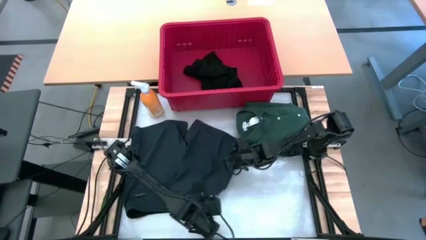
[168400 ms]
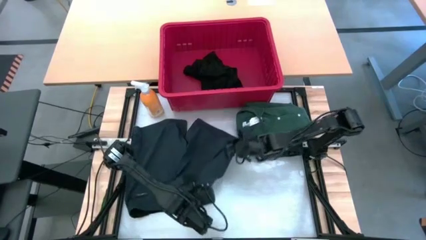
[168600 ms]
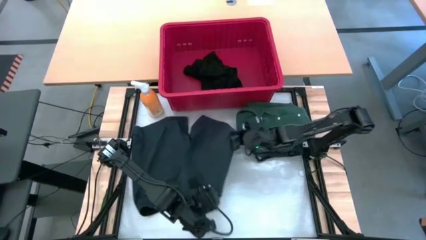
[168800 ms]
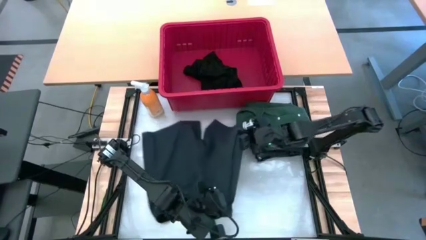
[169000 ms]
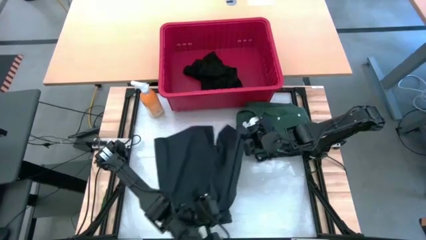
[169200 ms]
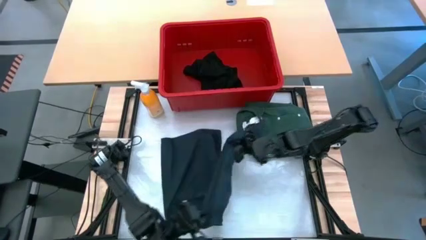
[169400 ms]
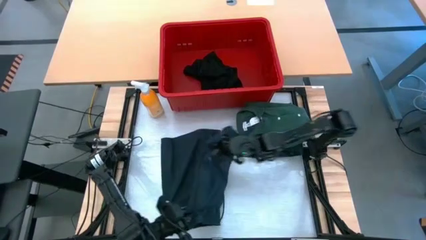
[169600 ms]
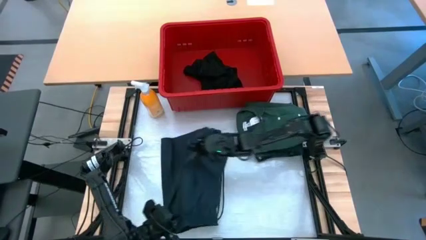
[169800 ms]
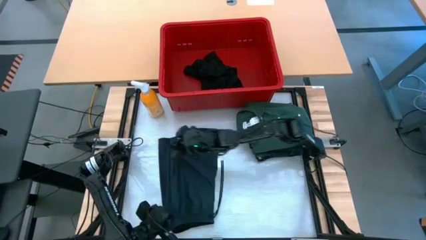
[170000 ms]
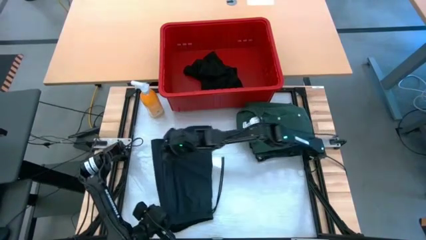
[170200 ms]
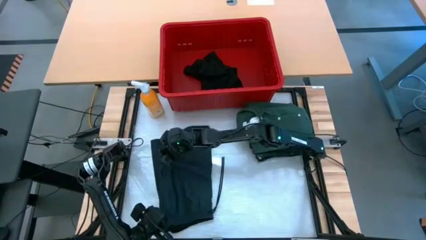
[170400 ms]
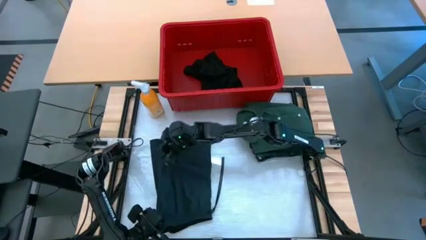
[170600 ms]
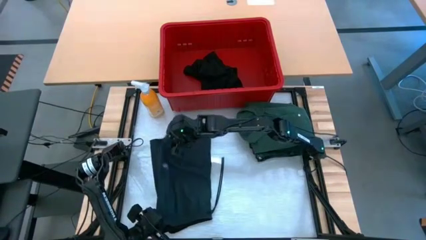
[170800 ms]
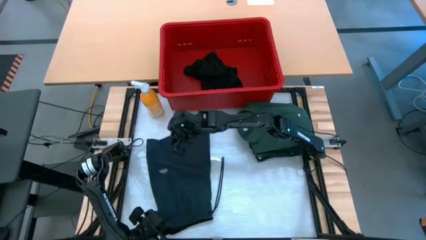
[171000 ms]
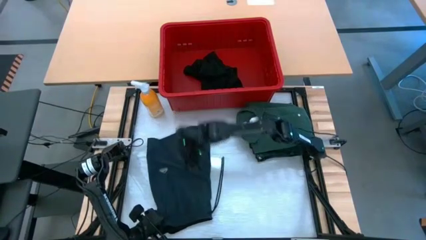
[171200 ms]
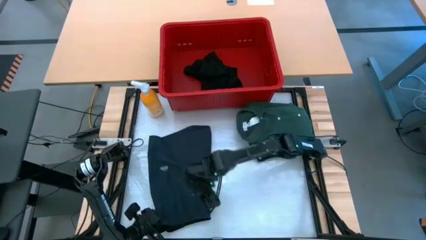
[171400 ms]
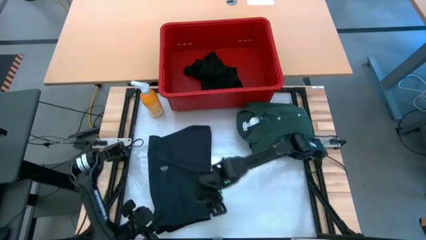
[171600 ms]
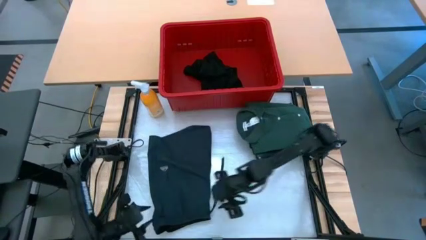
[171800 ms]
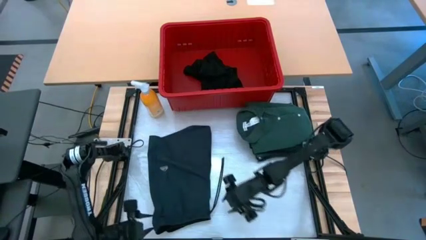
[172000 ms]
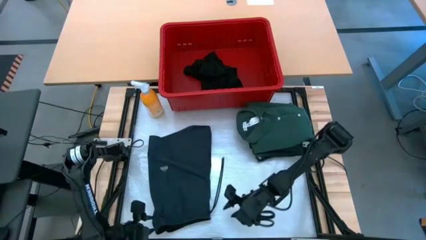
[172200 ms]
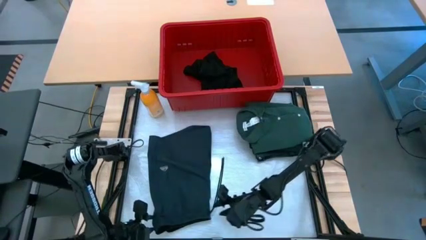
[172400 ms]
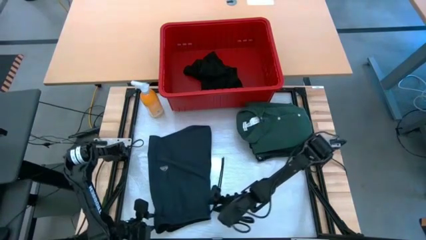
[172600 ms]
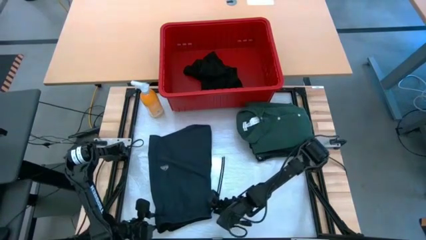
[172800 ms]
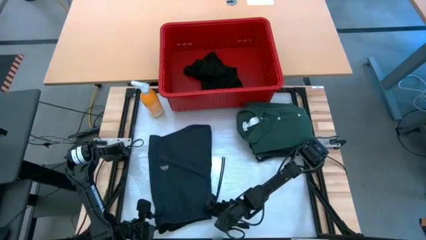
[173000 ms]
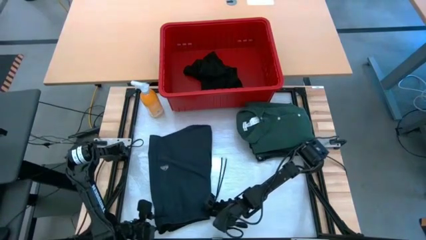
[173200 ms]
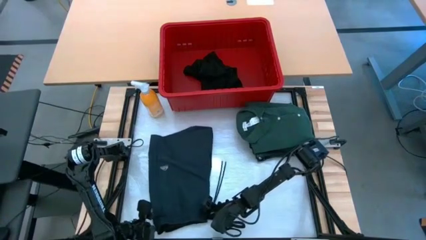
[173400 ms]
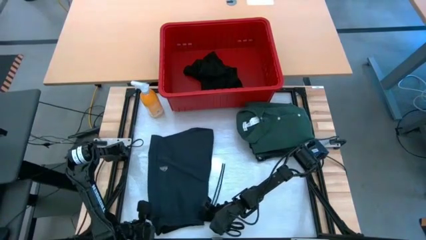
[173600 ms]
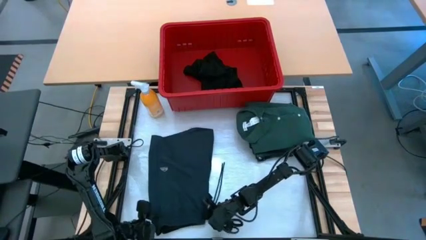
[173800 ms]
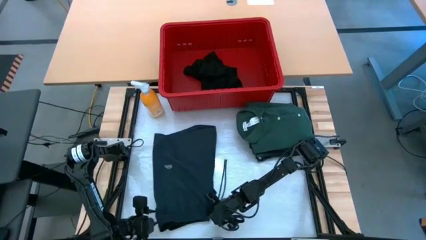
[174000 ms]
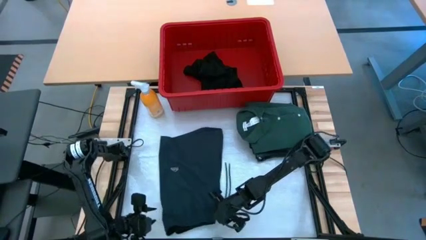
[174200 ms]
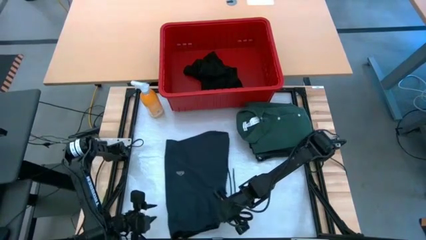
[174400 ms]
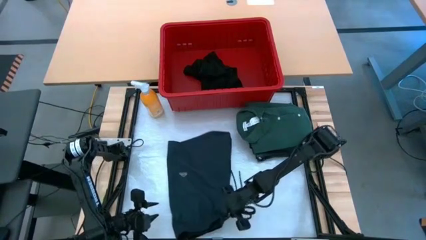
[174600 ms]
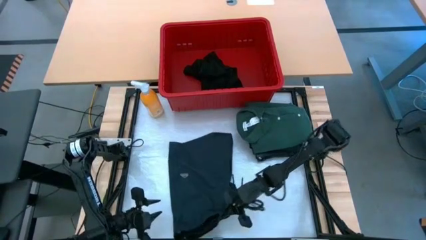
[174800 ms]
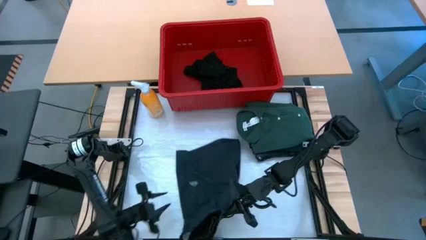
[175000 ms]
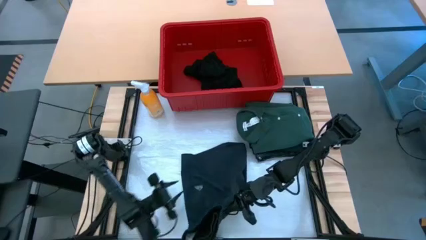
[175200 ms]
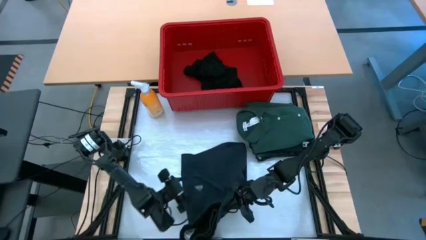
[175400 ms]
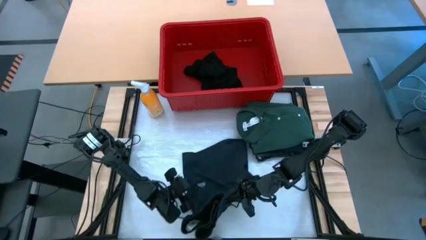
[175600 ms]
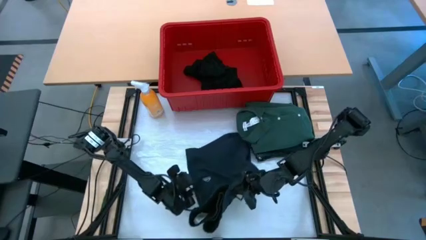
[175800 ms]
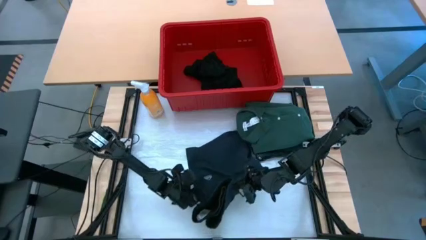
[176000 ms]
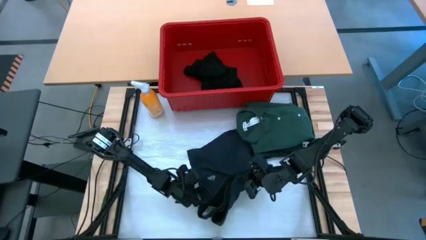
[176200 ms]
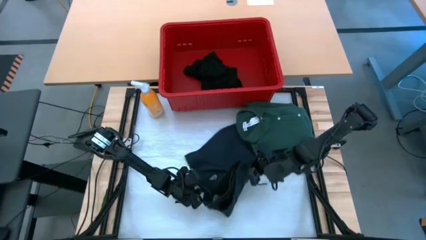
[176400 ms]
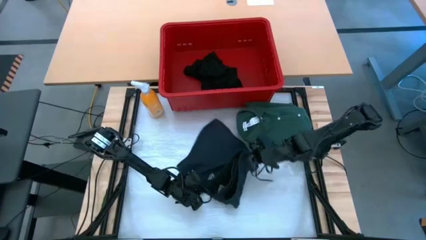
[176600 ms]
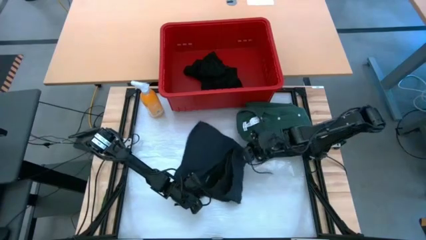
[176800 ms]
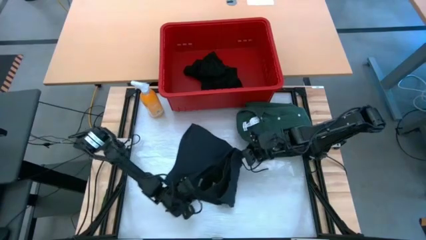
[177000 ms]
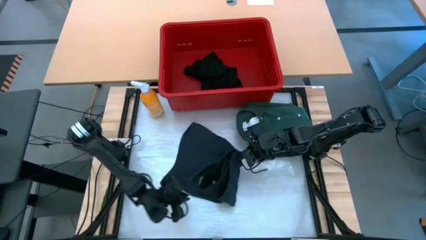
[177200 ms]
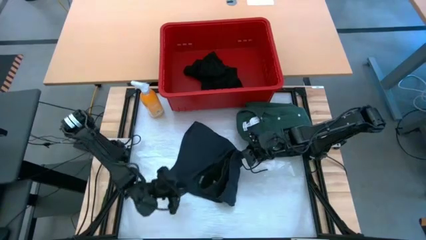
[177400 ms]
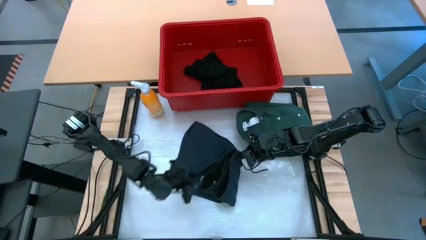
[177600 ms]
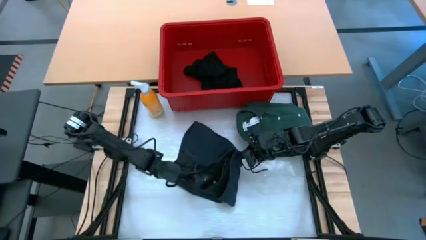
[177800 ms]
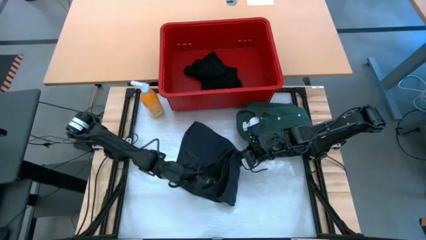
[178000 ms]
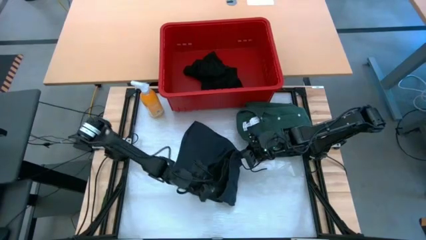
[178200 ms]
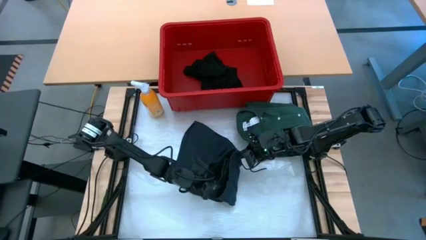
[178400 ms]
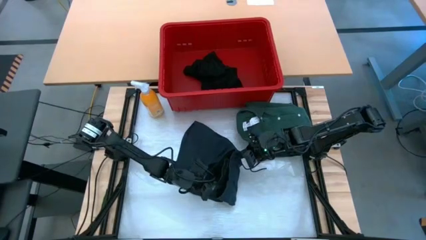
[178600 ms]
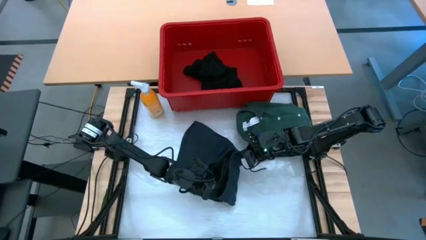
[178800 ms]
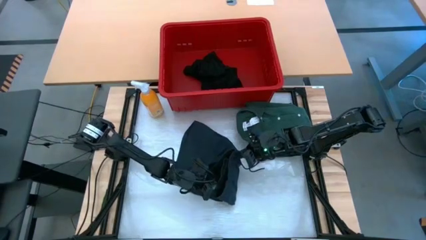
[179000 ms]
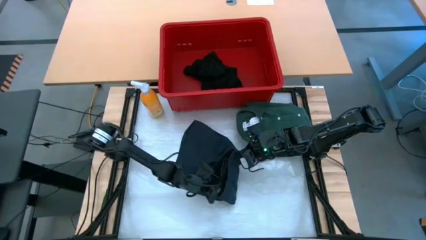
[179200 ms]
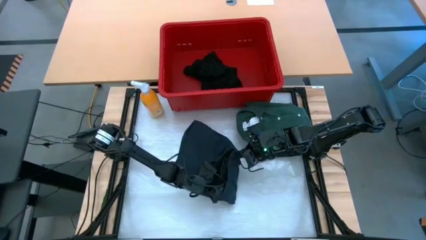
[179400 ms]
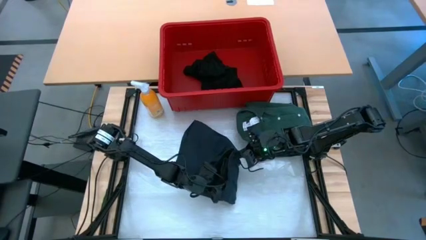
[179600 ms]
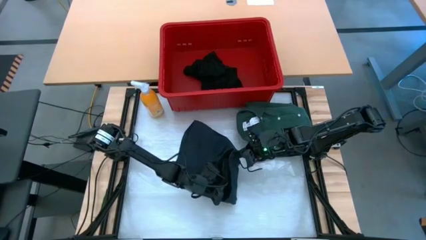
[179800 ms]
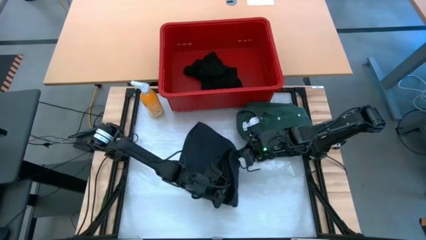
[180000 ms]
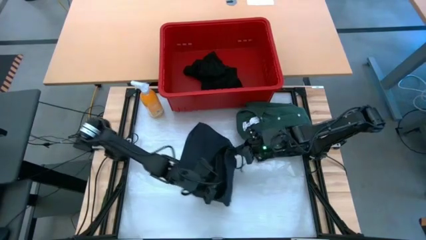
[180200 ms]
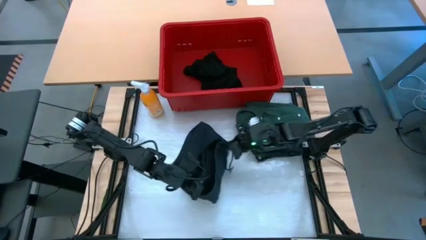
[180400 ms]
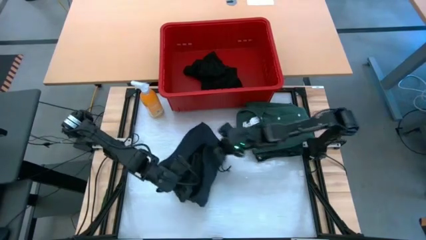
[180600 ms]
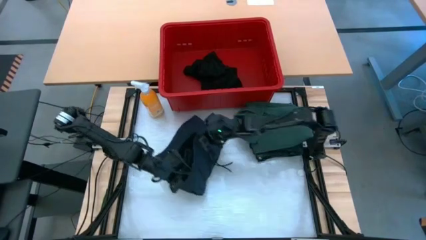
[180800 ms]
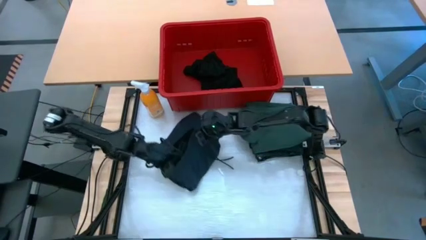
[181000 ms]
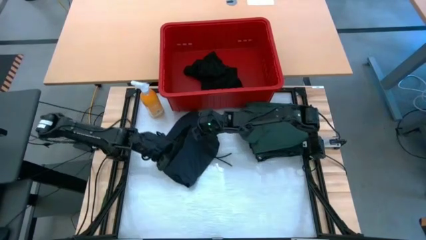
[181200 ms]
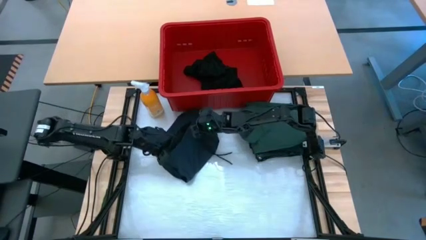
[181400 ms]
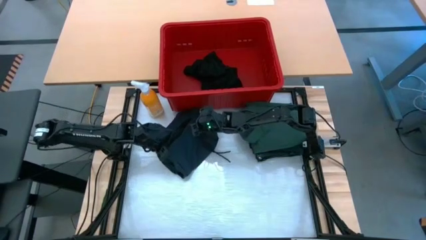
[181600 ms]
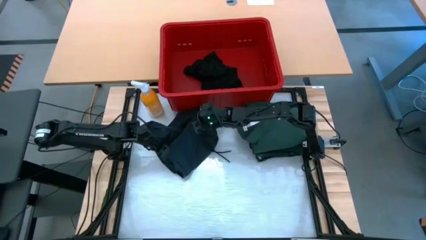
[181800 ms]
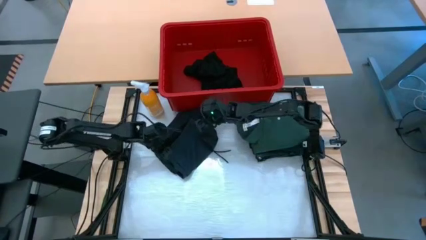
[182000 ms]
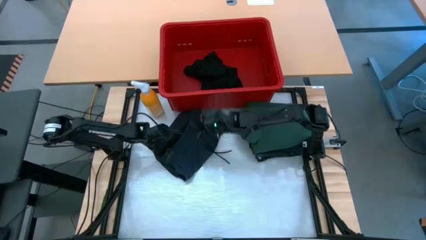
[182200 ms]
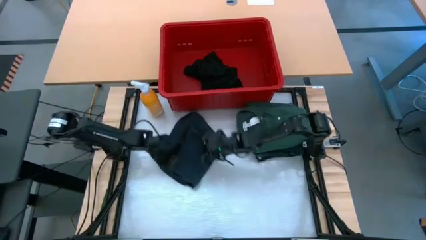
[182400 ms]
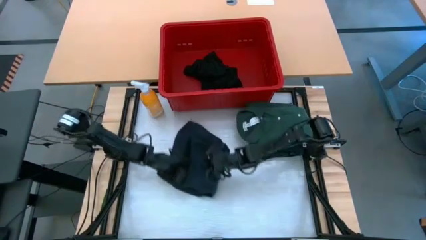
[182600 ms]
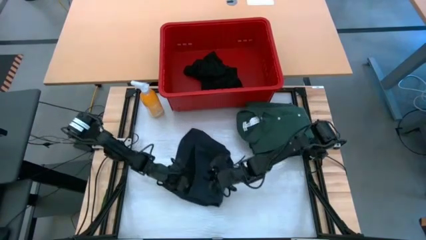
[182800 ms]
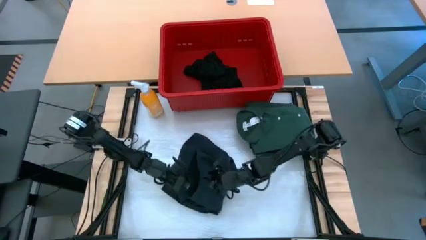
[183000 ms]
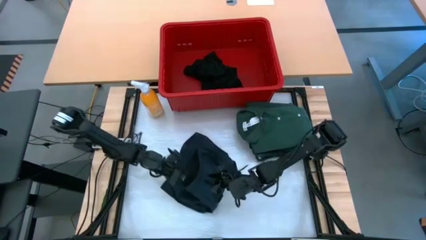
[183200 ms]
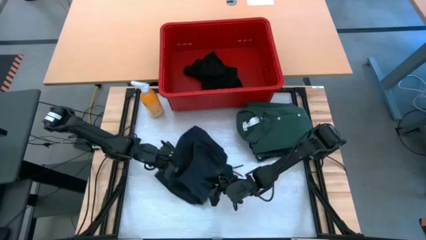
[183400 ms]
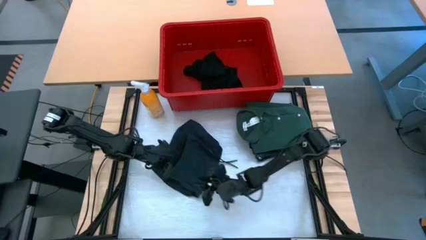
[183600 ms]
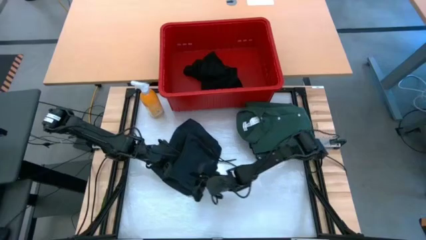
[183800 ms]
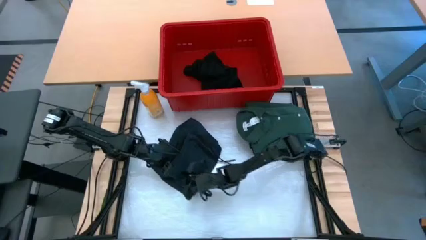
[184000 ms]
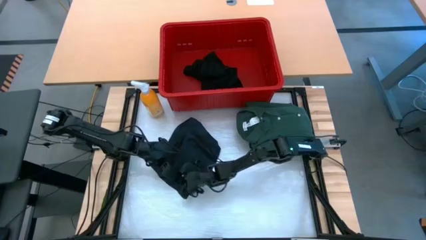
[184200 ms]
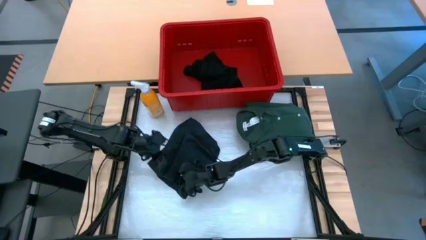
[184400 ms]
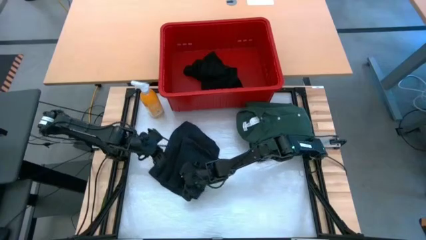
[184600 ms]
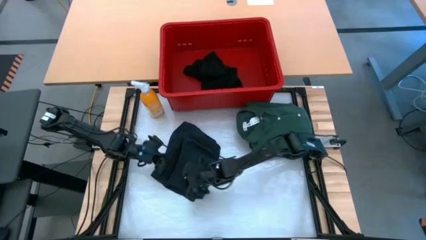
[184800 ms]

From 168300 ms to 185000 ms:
Task: Fold Laundry from Bin
Fold the dark blue shorts
